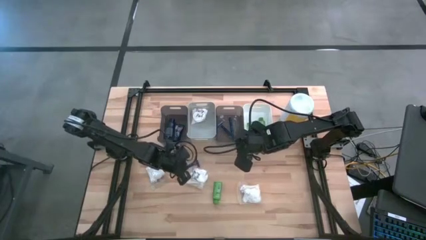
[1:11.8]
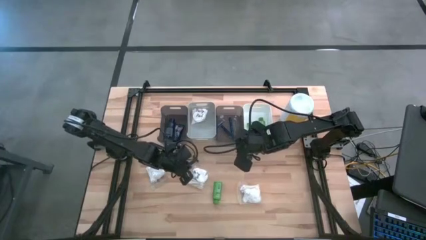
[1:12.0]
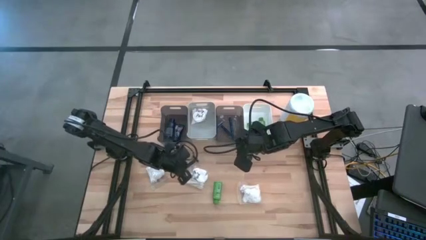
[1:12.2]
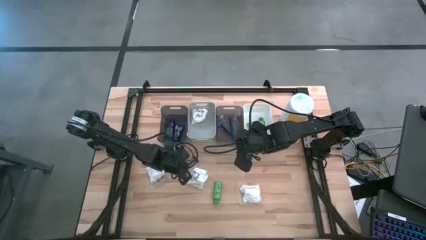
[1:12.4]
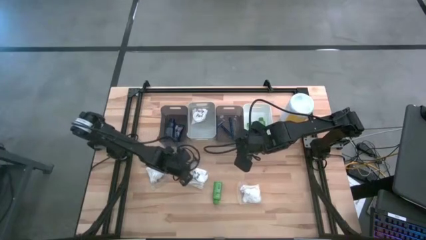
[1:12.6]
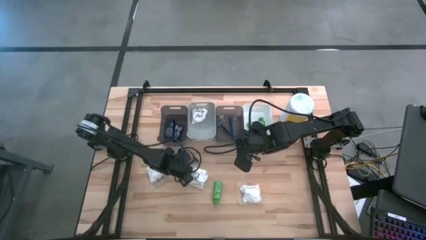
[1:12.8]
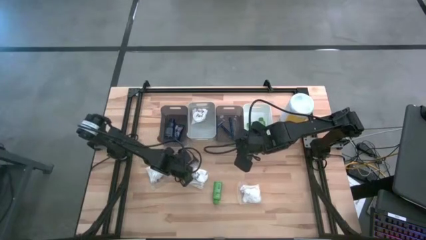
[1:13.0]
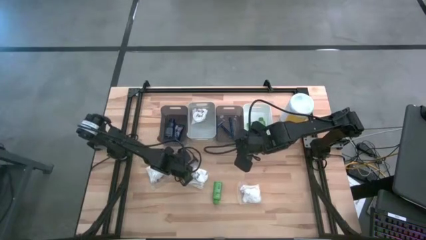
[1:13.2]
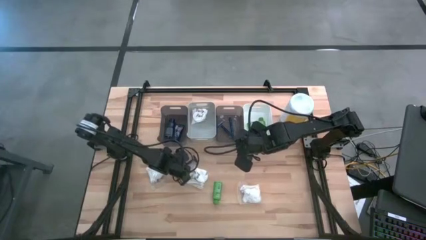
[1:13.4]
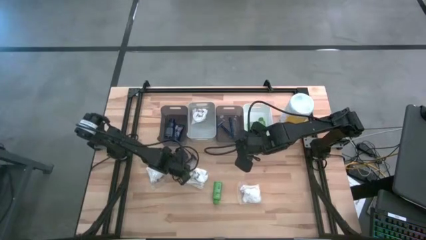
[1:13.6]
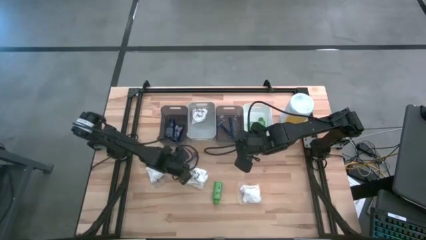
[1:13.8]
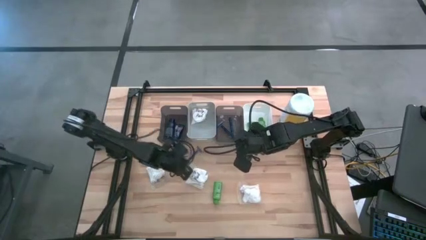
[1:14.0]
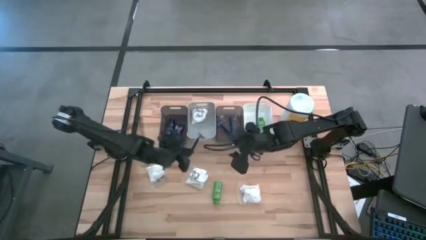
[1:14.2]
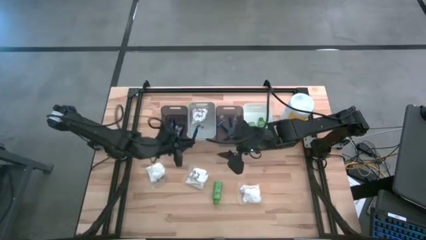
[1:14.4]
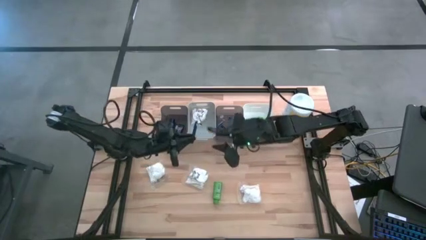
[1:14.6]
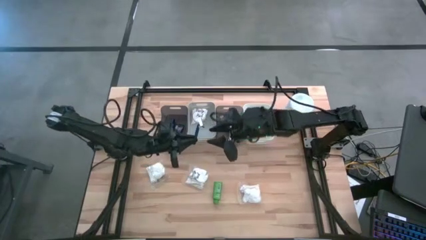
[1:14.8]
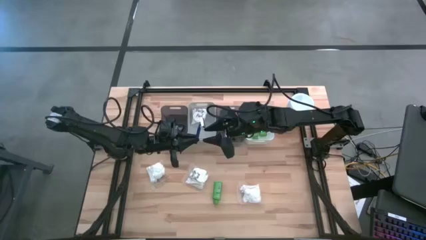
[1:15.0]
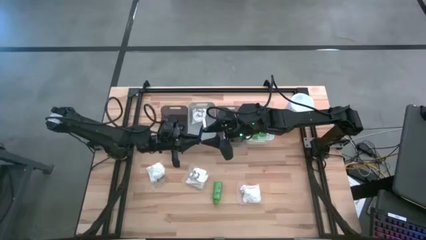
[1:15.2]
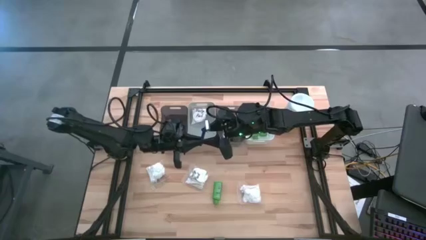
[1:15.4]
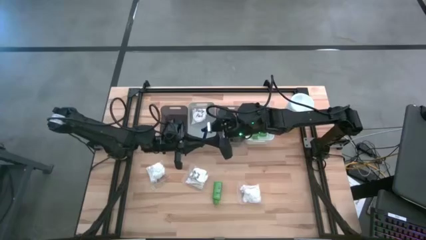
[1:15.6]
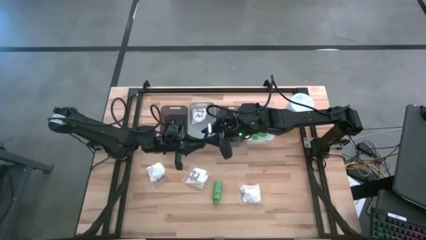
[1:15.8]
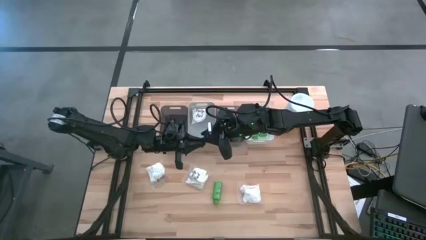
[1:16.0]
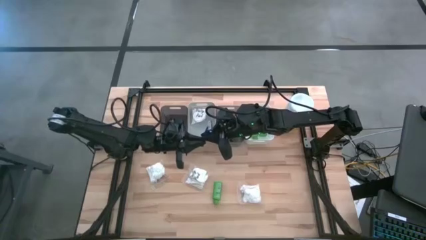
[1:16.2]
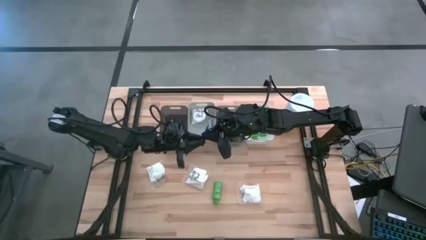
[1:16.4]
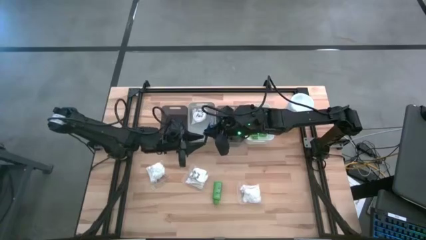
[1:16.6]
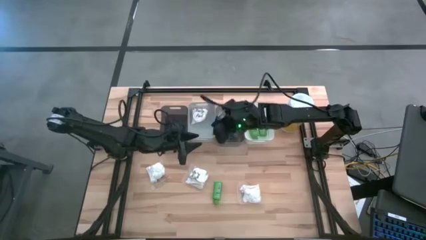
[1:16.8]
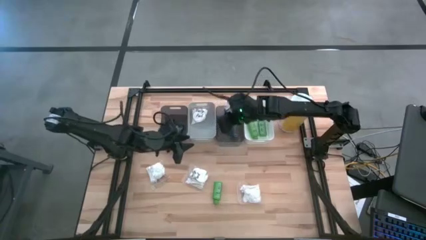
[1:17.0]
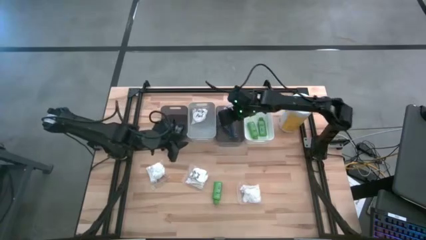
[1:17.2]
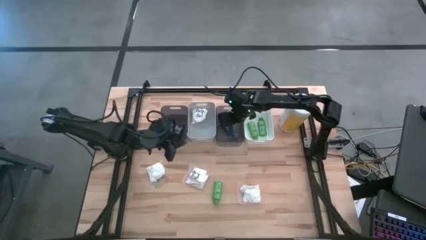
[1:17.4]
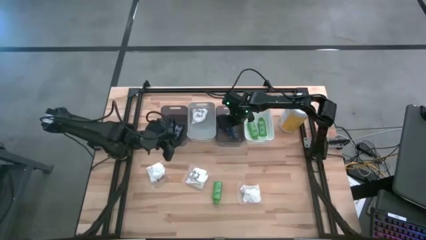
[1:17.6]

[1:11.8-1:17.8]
Task: Pick & Place Travel size toiletries
Put the blue razor into the right black bin

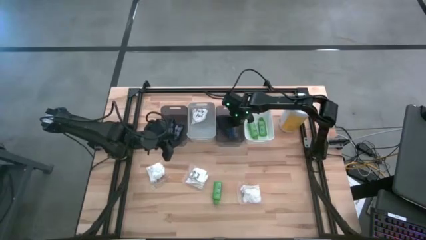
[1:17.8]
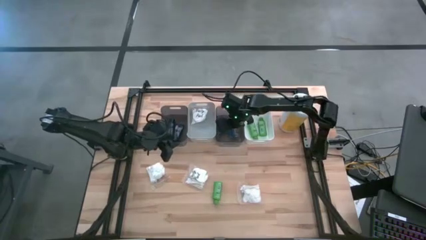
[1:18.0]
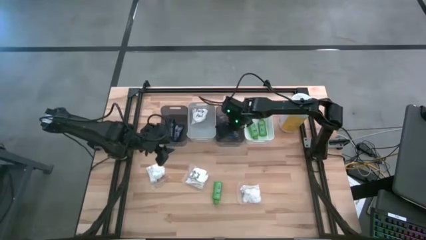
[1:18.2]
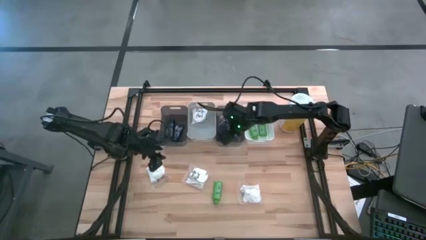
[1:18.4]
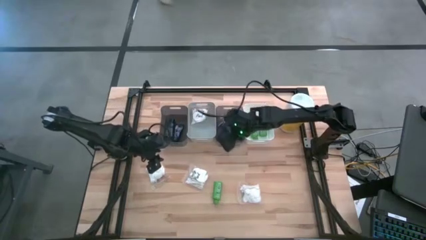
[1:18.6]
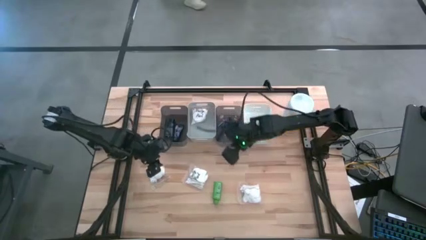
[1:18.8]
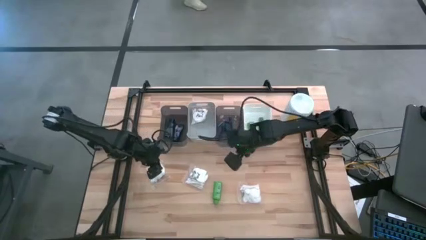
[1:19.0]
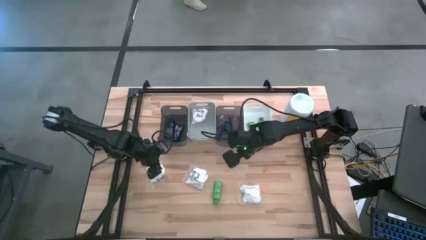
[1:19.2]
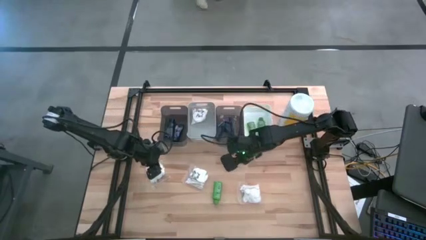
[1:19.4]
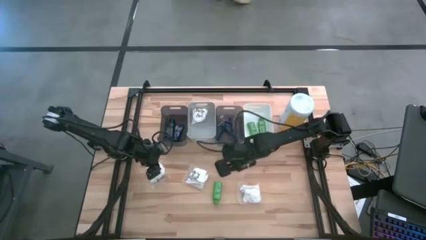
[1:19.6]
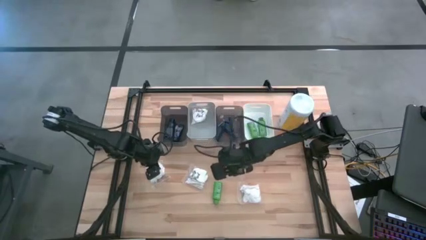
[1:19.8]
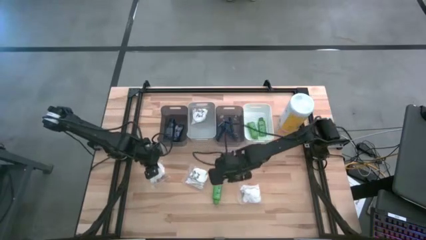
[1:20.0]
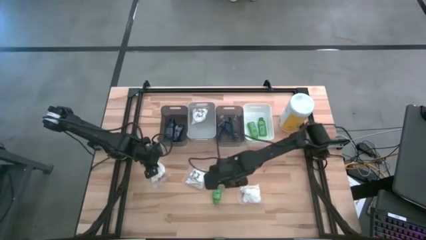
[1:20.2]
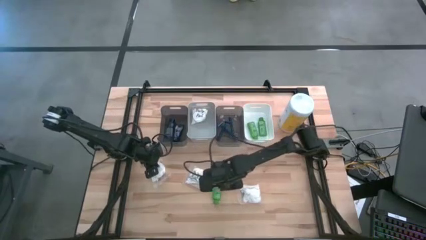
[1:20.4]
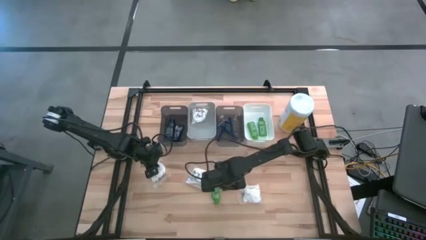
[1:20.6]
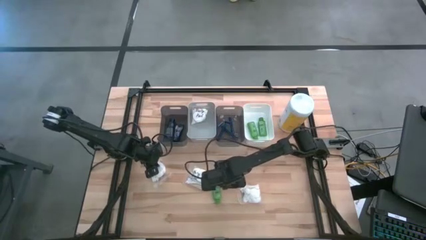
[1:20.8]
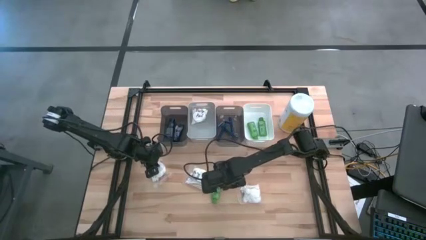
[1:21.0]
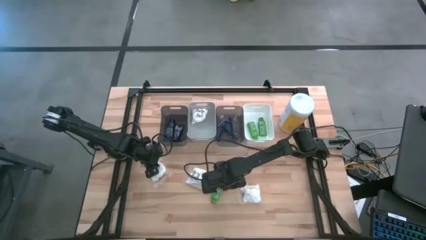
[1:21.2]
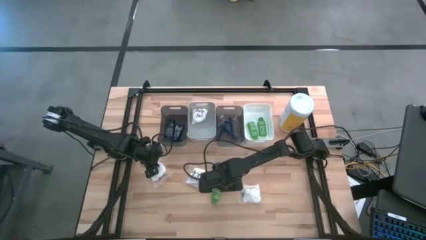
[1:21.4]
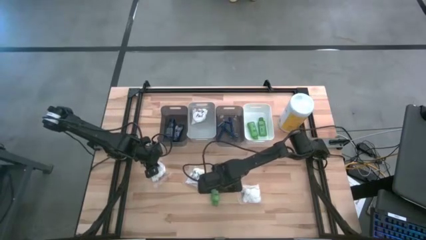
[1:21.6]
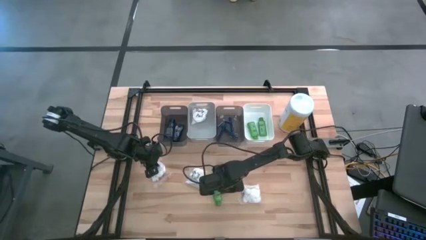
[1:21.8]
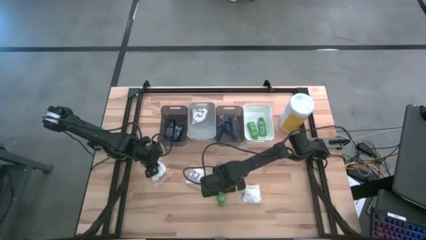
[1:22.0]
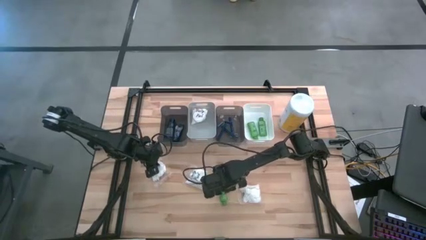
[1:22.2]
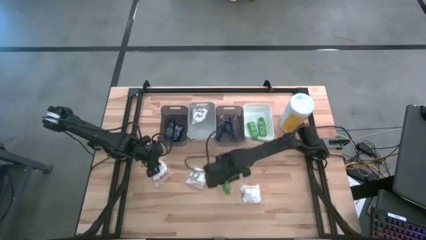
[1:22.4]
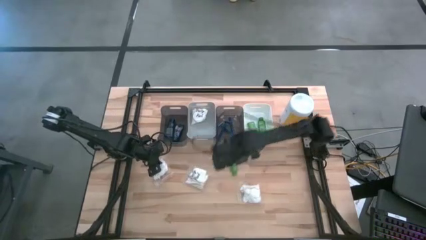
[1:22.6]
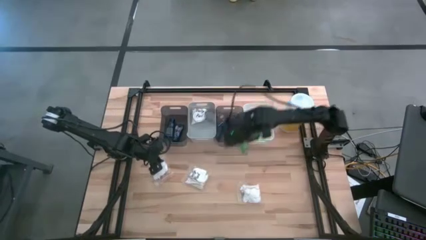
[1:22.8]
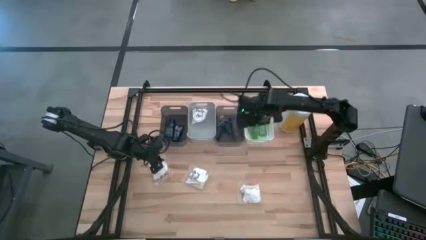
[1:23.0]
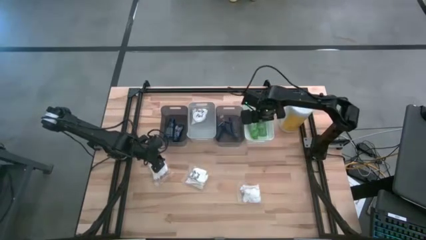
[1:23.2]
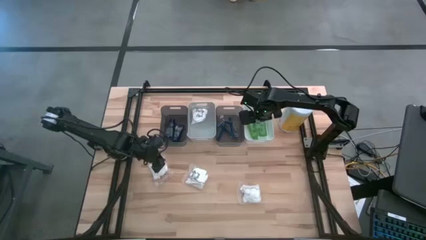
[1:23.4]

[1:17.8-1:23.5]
Put the green shampoo bottle into the white bin

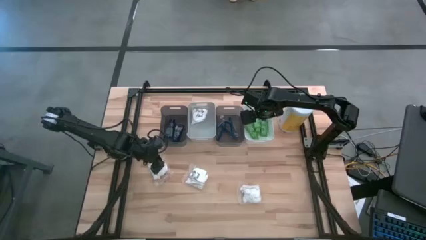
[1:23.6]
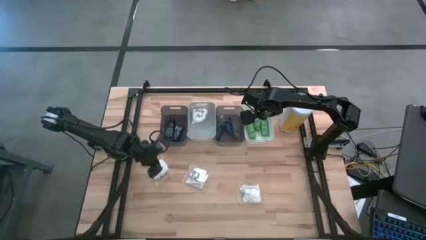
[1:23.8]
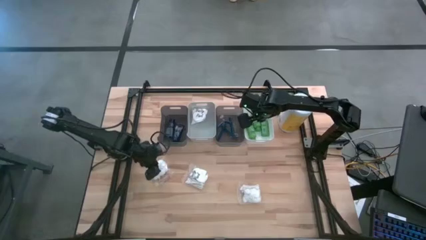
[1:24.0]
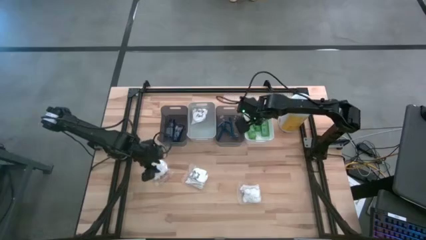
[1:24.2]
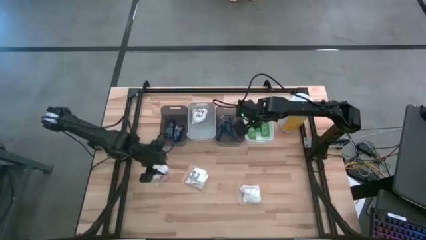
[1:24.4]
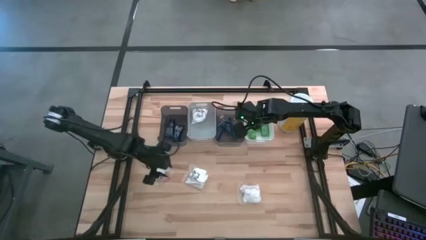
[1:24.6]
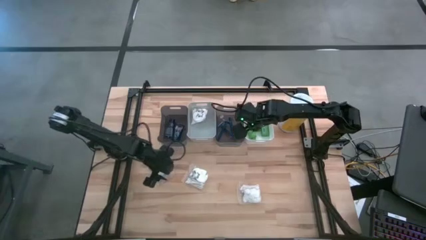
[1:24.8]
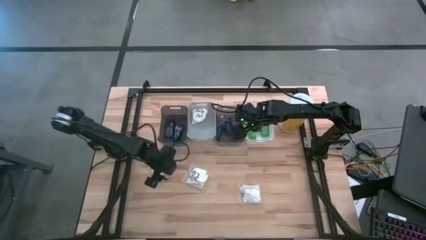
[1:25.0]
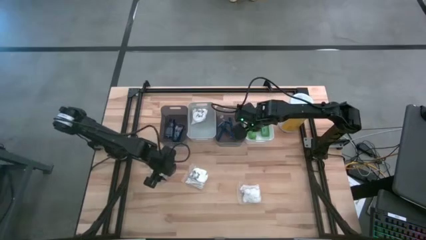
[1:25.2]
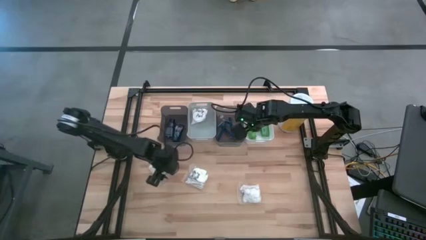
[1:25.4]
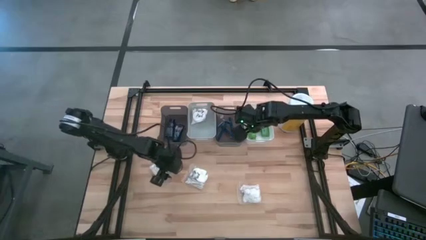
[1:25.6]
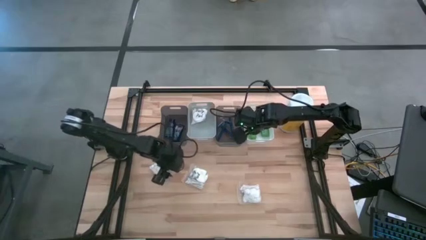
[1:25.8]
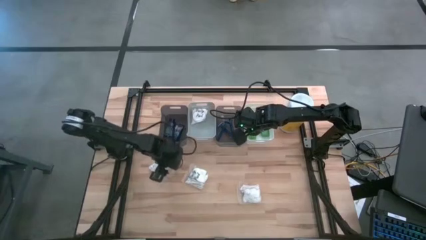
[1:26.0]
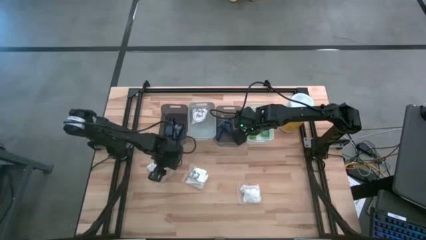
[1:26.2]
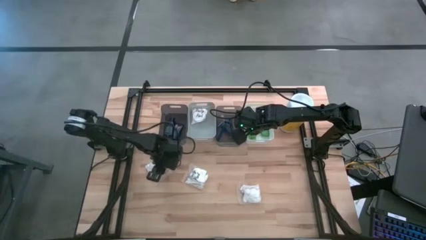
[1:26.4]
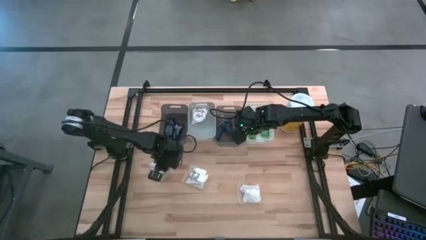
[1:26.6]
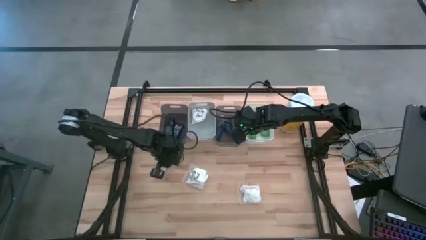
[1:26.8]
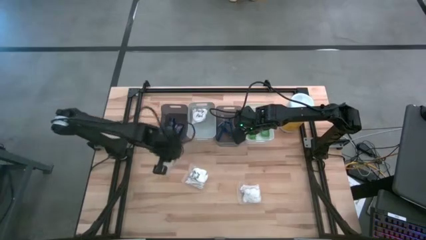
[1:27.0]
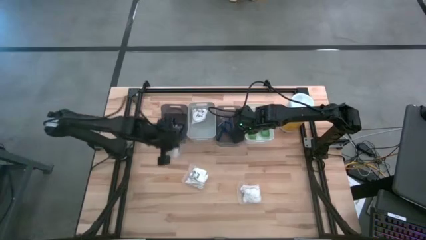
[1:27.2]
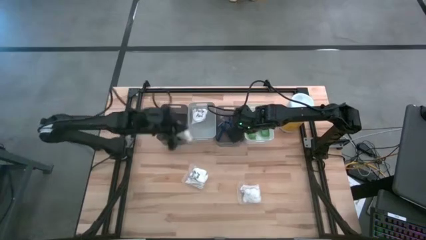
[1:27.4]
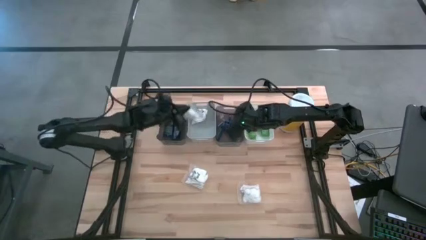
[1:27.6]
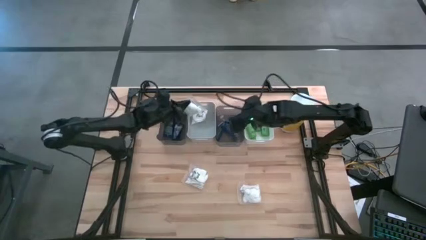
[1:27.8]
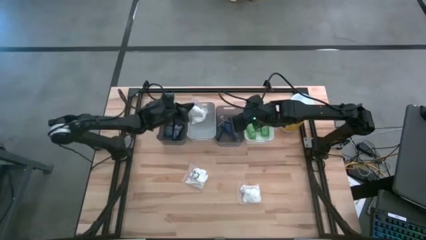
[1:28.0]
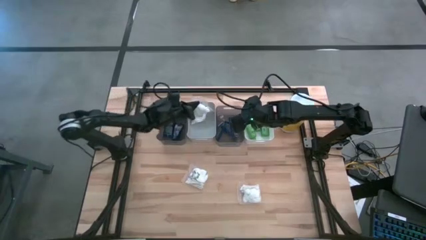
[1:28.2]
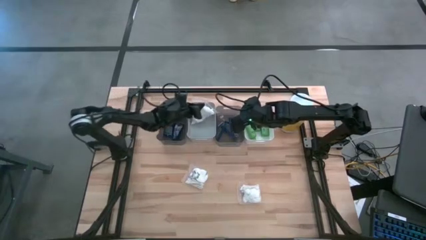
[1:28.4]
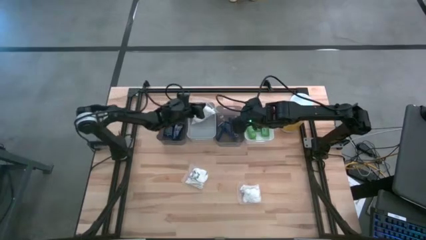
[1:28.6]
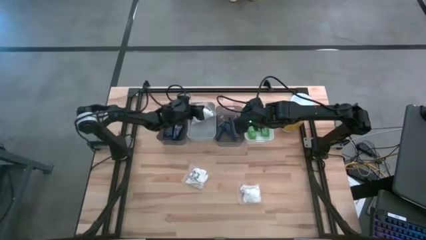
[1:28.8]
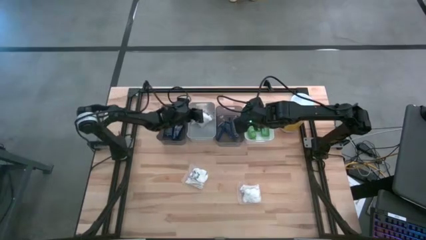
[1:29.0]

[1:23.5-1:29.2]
Put the white cotton pack into the gray bin
